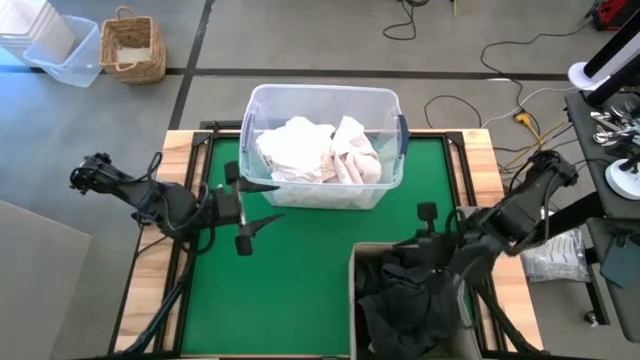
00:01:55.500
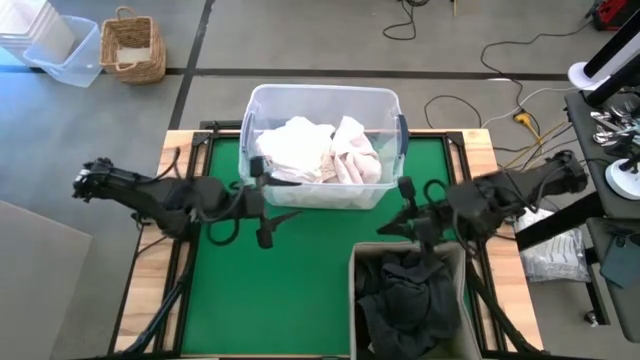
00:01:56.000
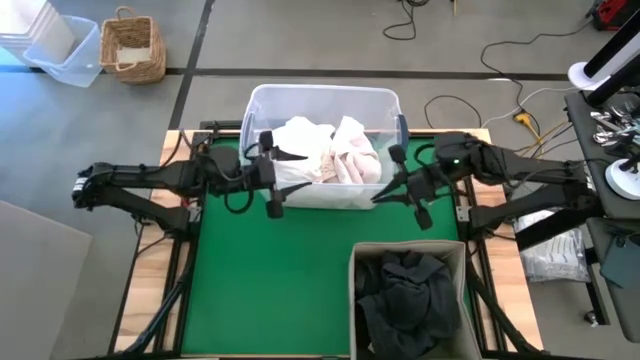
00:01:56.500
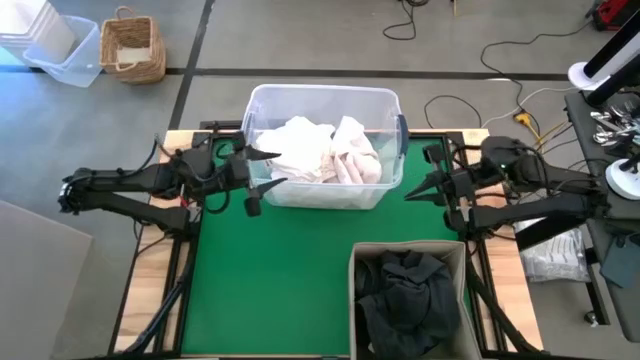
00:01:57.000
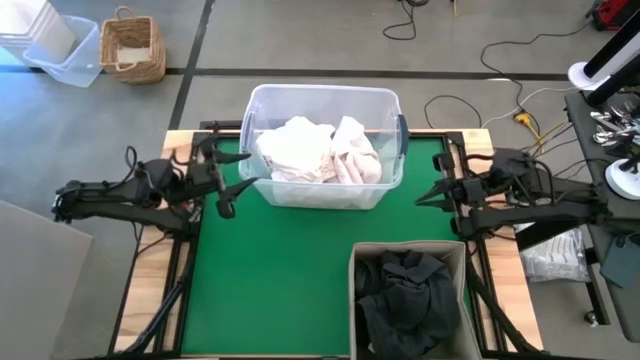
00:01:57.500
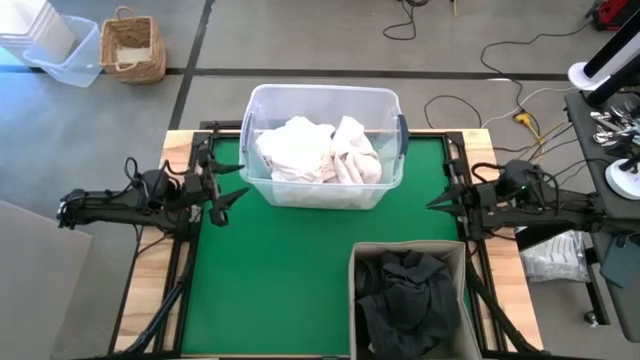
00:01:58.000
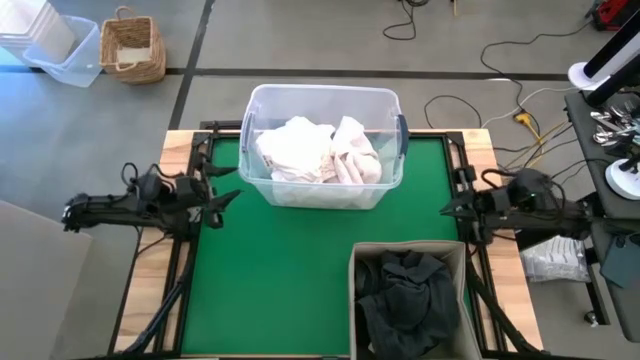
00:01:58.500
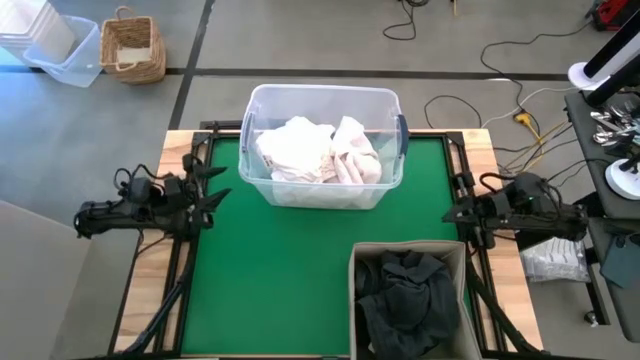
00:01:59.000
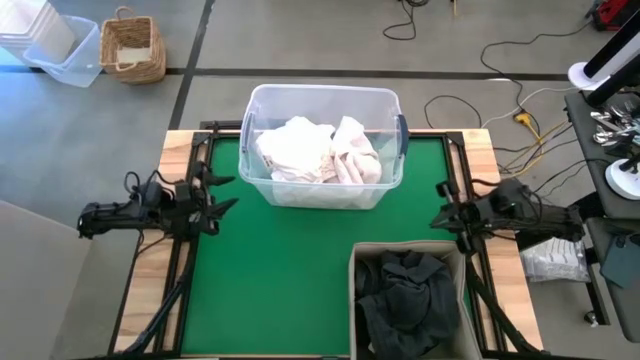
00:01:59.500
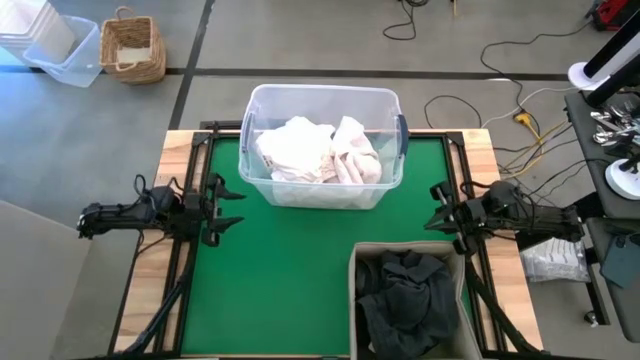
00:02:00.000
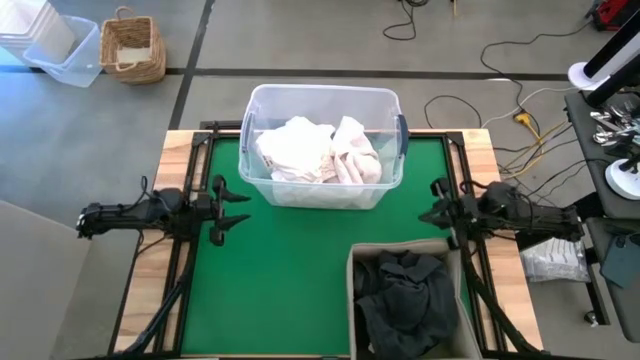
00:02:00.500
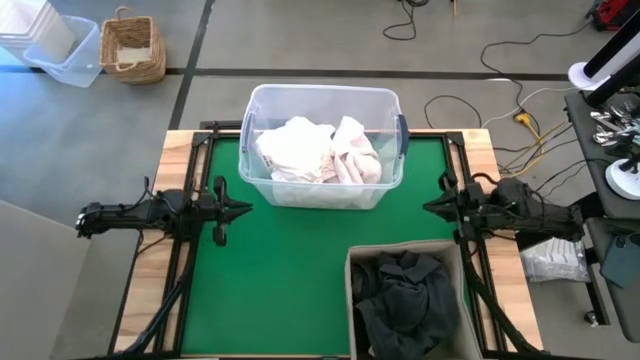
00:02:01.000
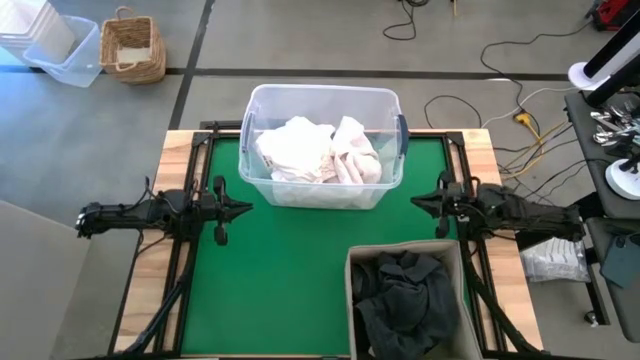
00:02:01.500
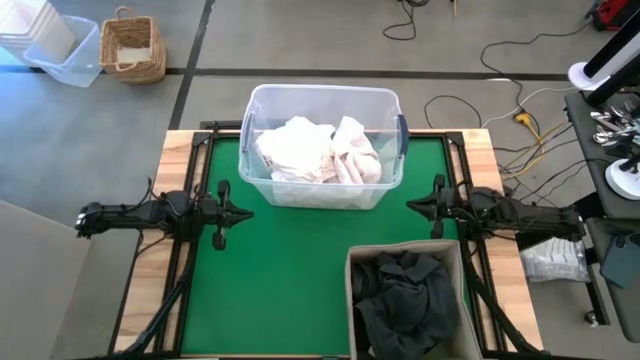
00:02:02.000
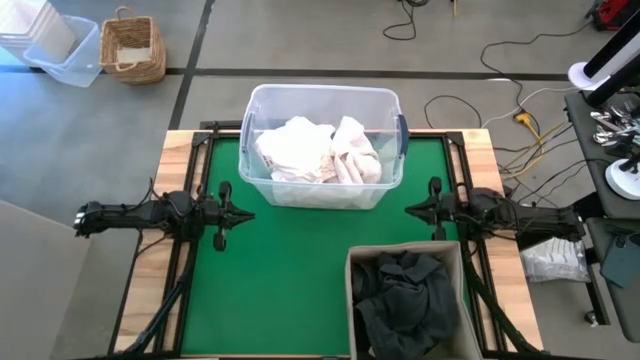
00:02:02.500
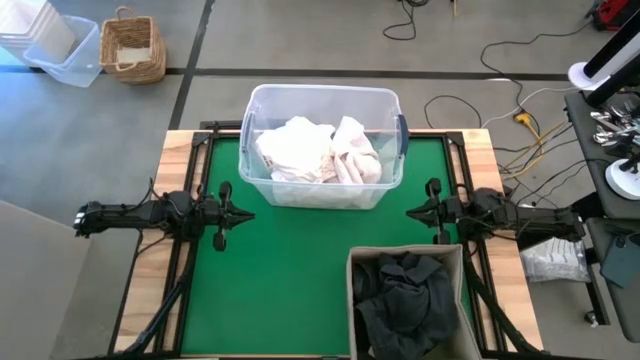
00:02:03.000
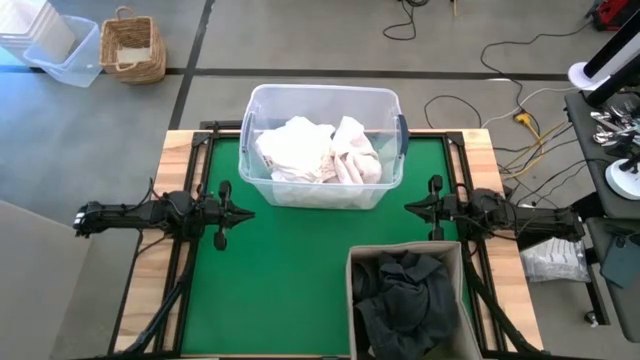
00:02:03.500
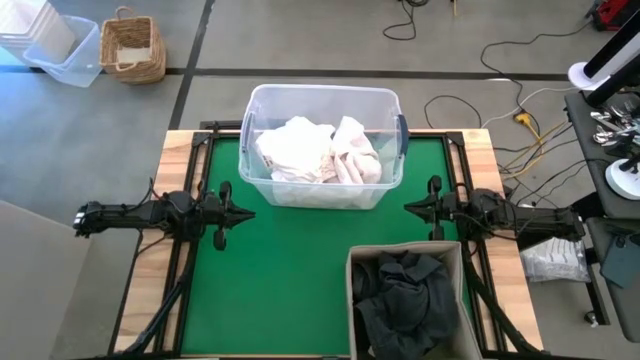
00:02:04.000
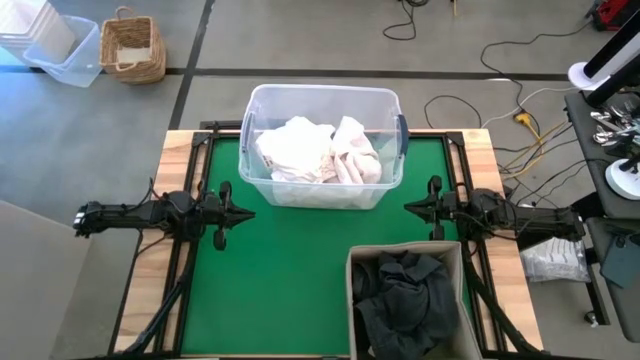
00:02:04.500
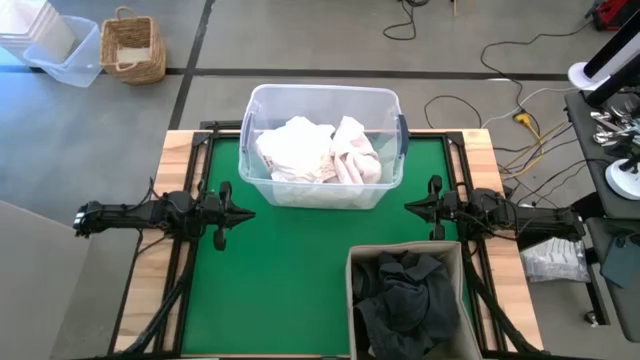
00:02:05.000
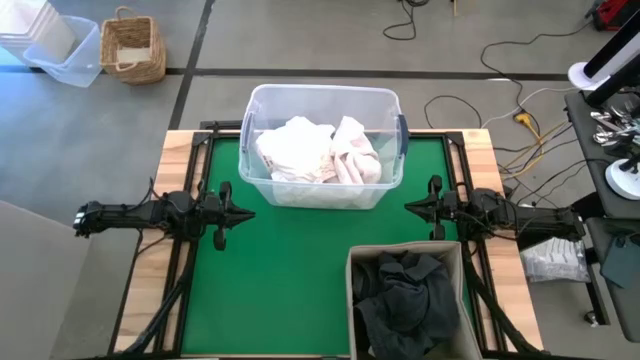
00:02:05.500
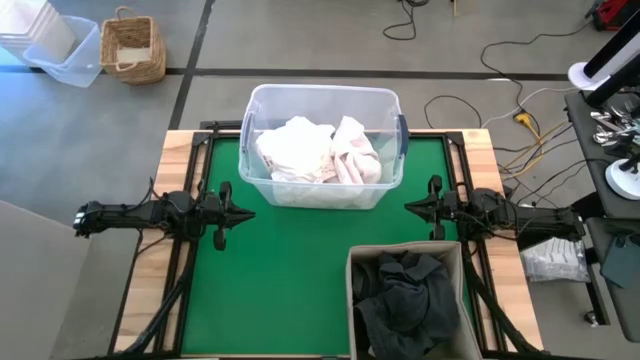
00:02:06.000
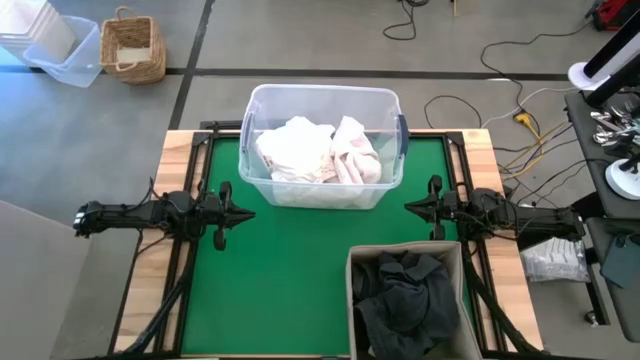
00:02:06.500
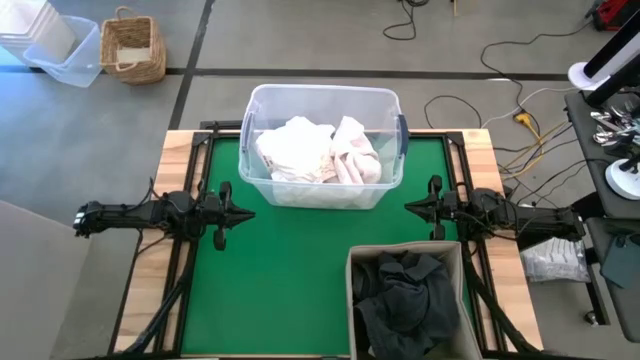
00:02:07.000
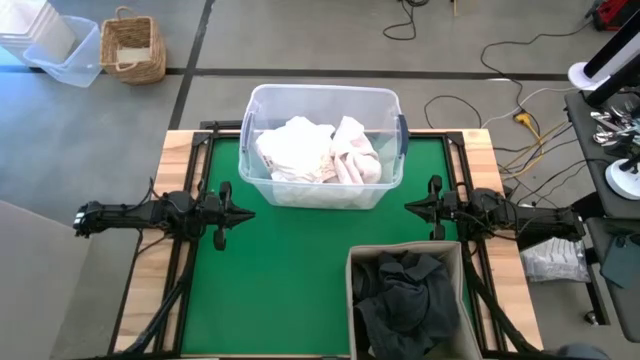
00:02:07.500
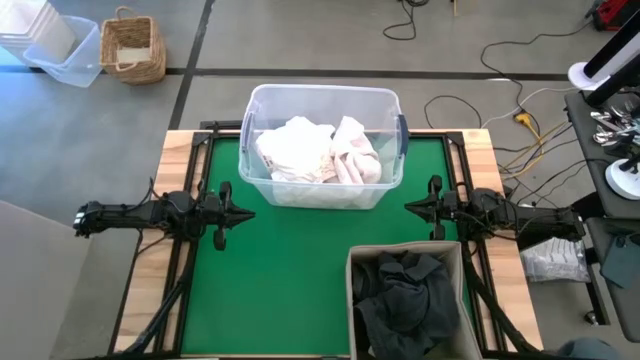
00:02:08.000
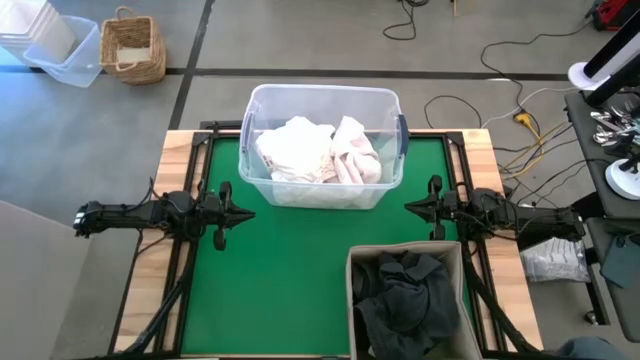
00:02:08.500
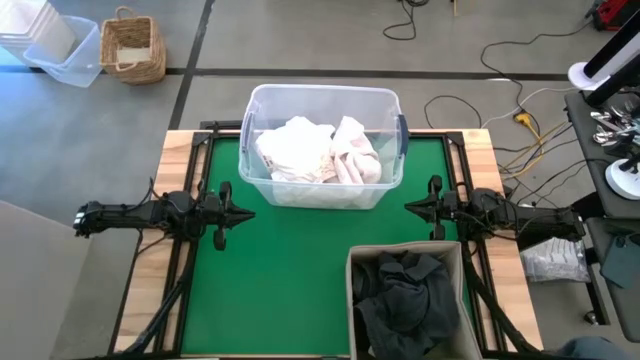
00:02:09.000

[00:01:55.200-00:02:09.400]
Return to Home Position

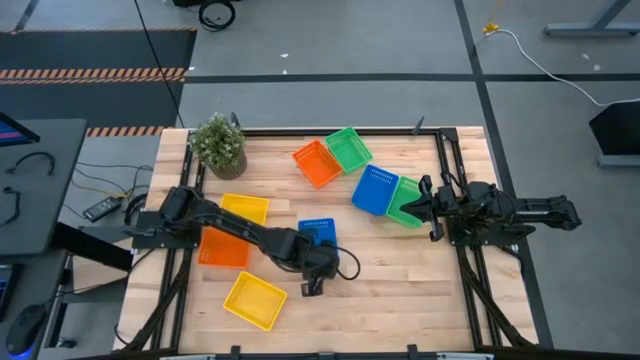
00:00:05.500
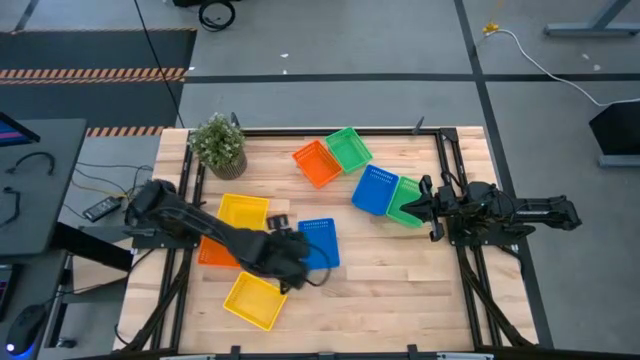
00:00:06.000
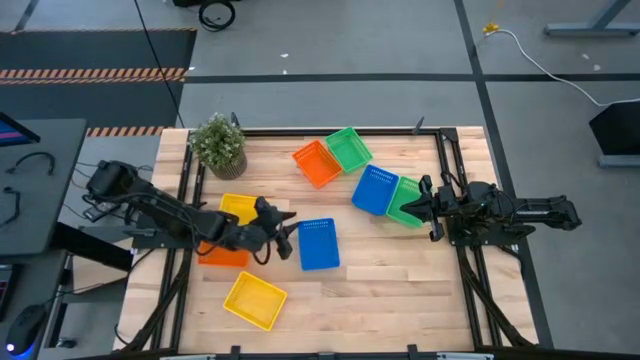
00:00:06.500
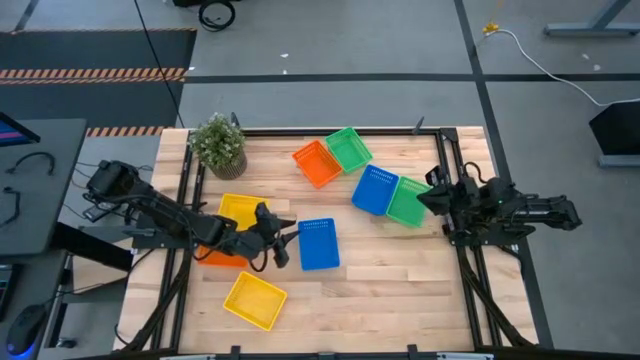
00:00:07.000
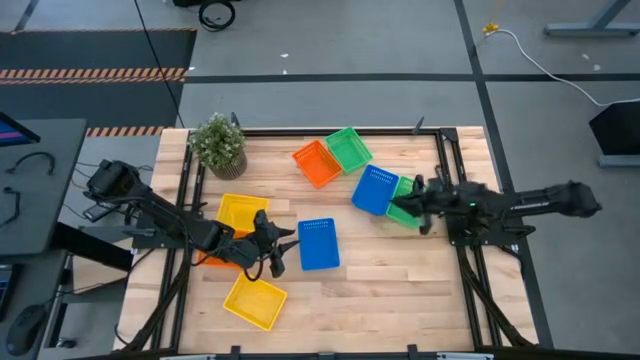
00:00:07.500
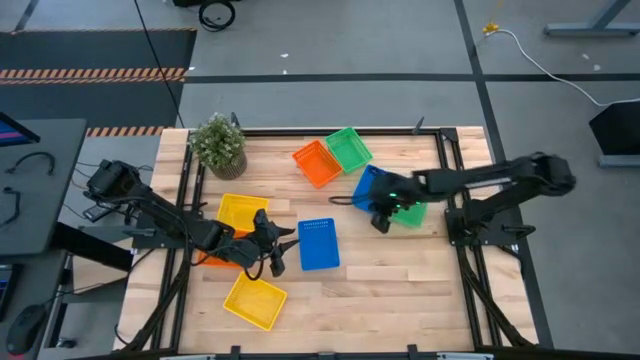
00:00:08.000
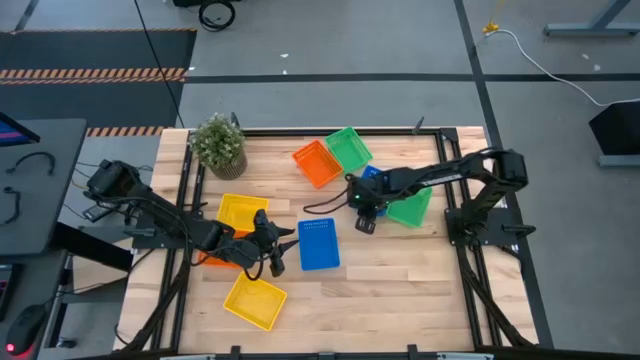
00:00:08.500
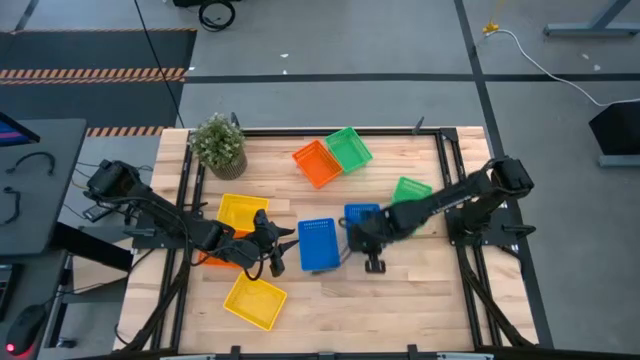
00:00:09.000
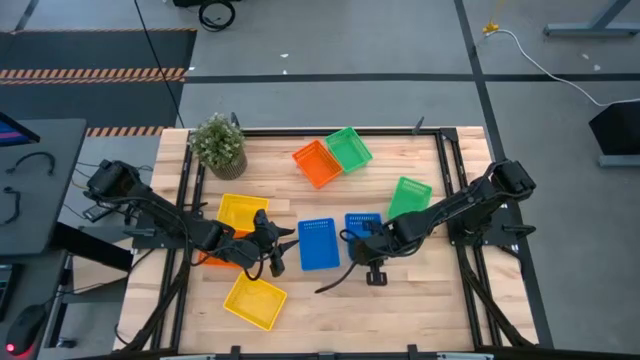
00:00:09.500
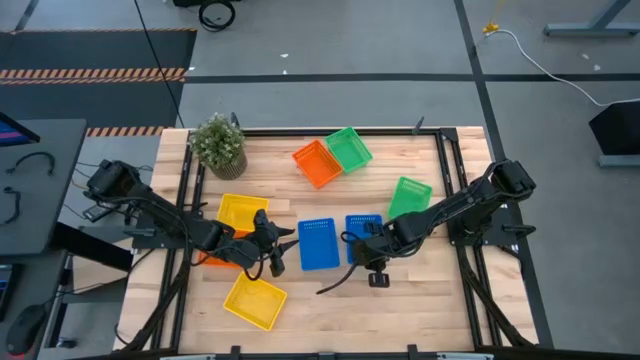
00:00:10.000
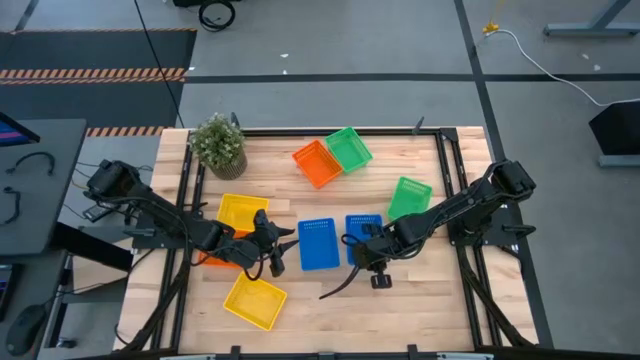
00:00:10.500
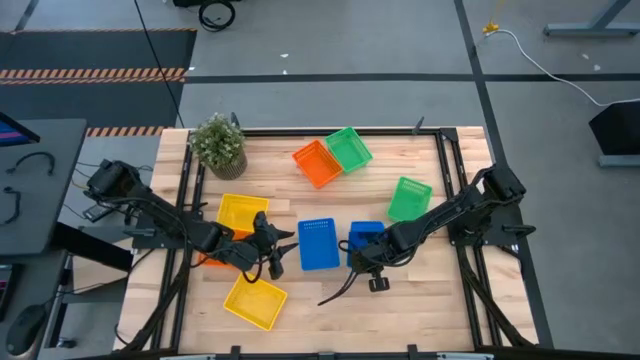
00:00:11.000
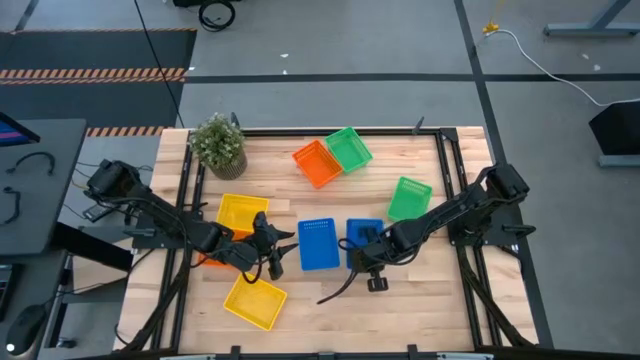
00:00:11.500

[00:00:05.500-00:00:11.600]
Stack the top blue bin on top of the bottom blue bin

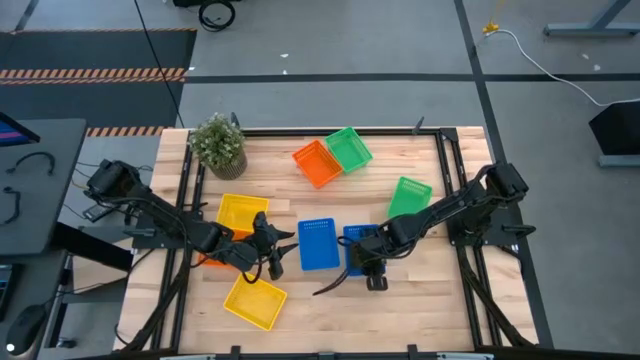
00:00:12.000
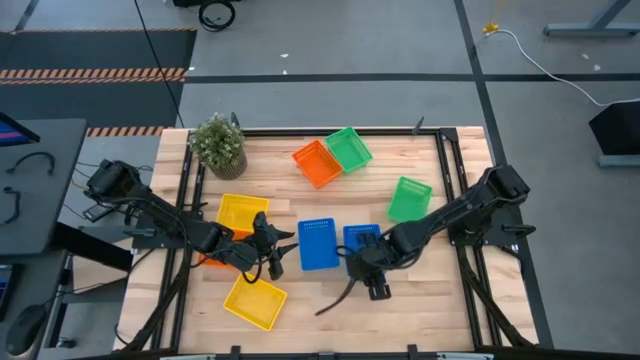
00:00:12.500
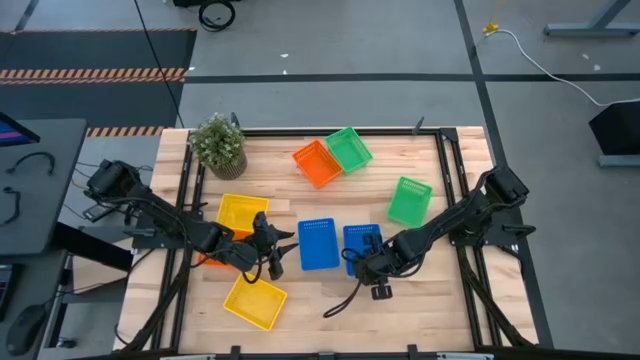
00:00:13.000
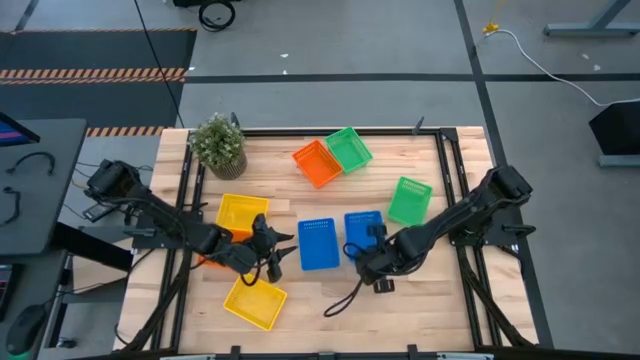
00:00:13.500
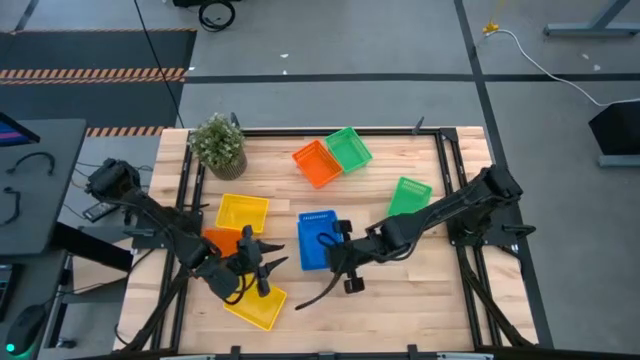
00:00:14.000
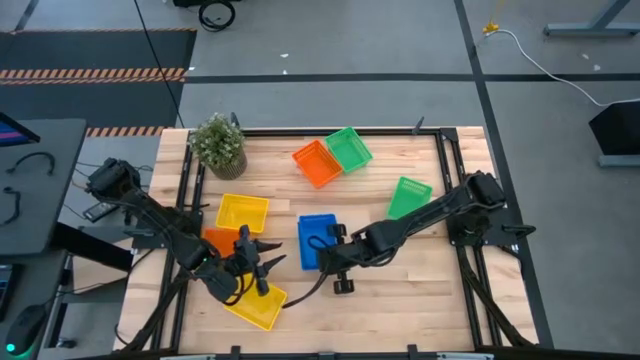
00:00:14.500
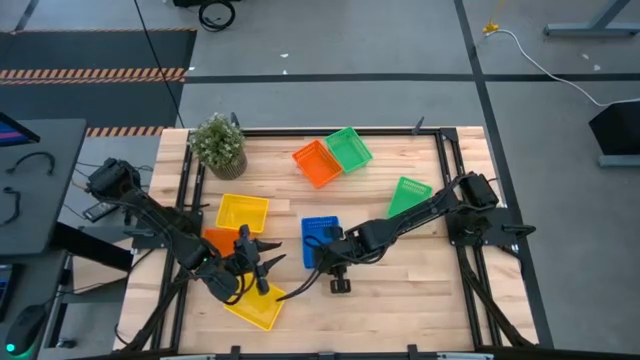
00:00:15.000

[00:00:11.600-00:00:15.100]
Stack the right blue bin on top of the left blue bin
